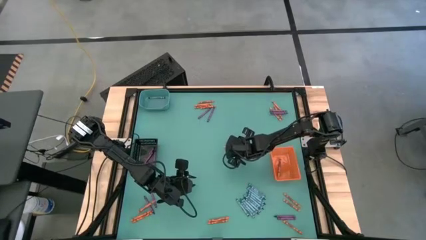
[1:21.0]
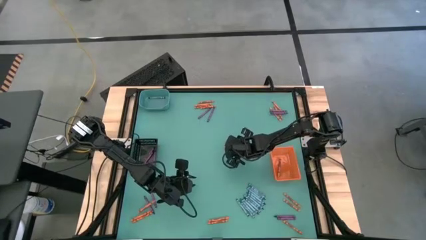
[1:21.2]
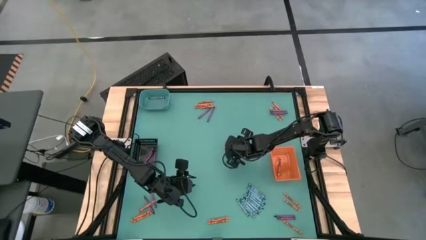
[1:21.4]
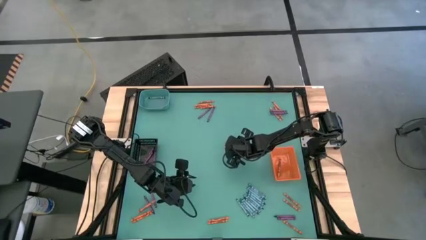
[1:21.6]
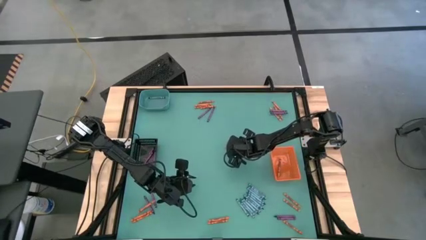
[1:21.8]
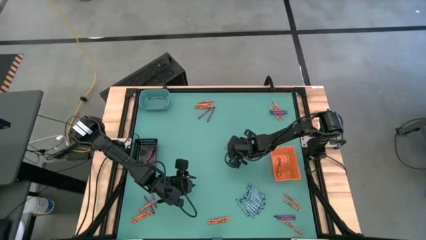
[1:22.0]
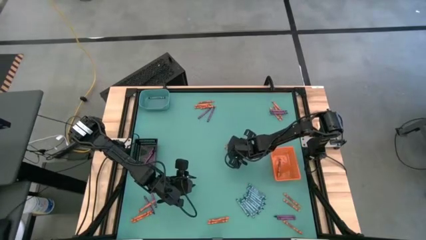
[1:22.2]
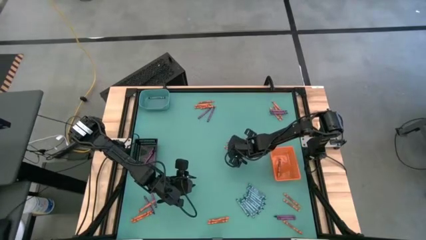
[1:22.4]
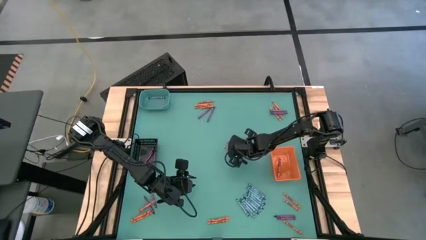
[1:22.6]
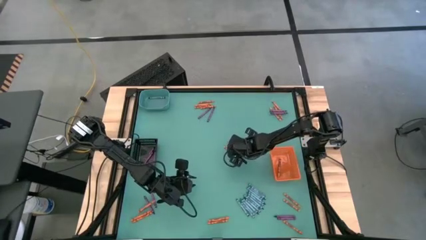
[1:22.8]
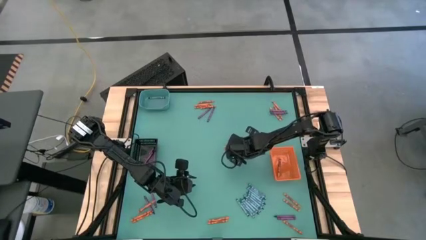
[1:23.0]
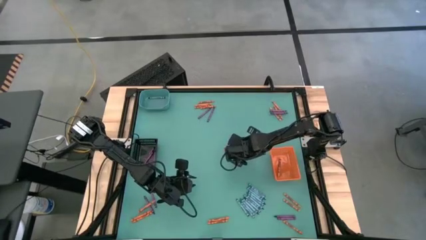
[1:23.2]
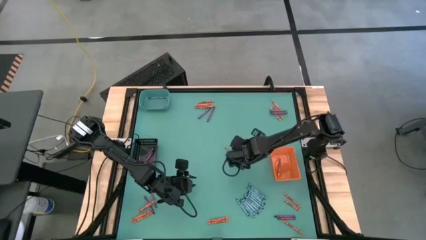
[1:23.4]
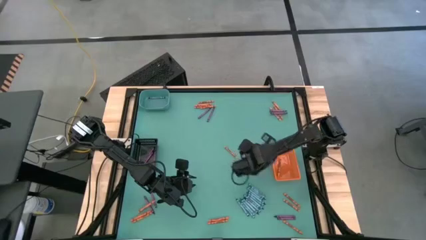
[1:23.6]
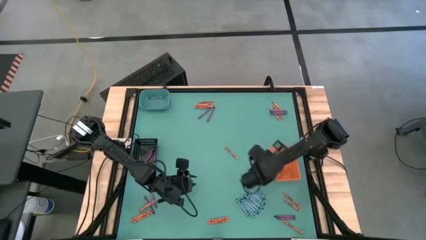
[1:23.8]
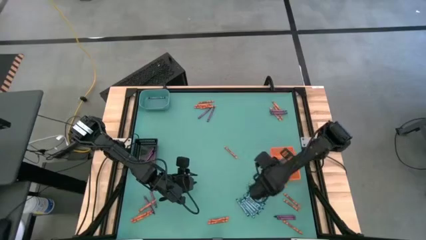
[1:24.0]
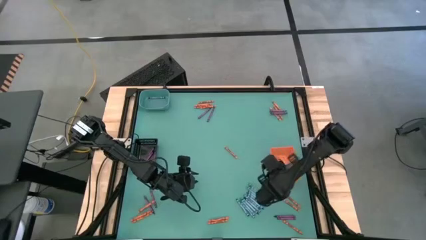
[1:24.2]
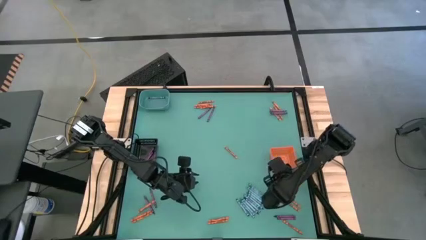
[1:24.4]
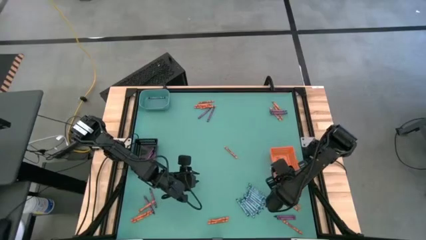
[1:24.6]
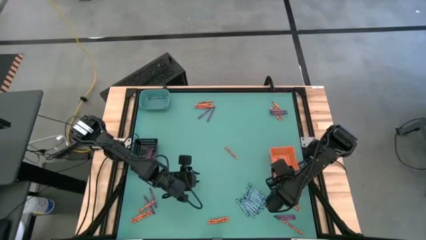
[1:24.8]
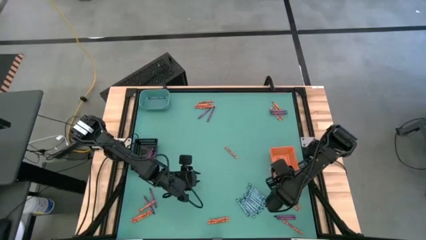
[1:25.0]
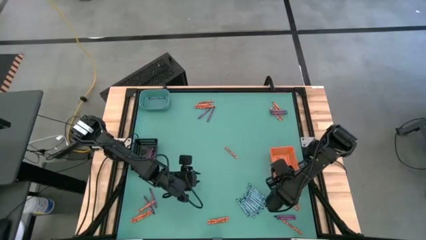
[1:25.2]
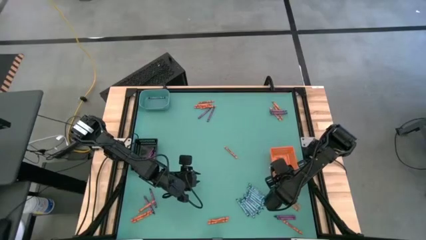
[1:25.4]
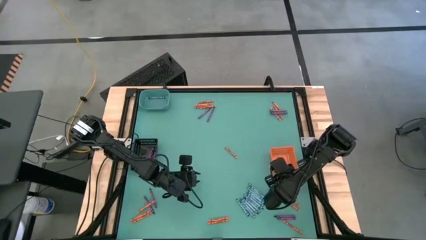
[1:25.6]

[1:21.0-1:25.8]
Task: Sort crayons
Put the orange crayon into the orange bin

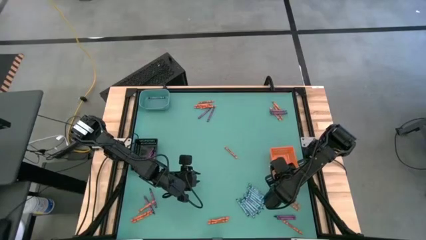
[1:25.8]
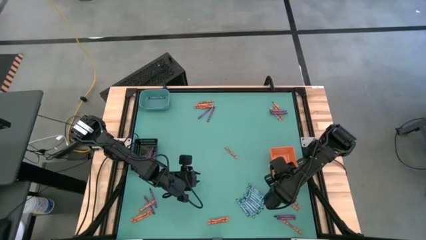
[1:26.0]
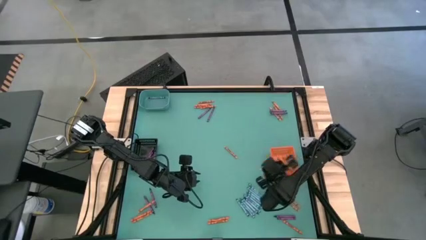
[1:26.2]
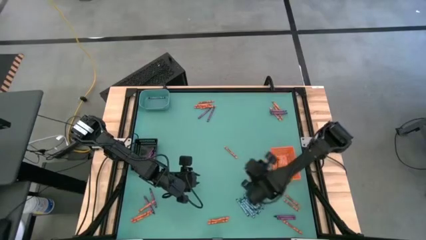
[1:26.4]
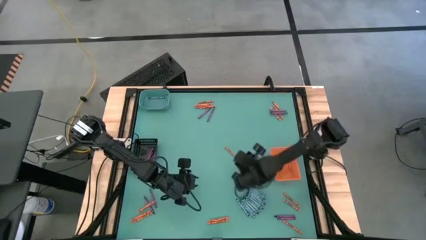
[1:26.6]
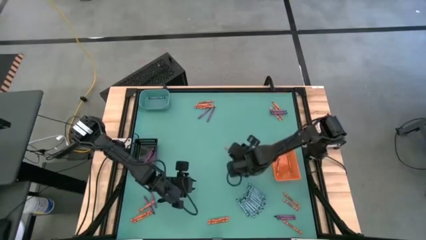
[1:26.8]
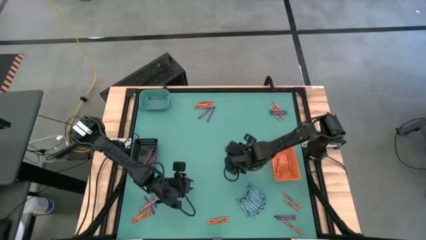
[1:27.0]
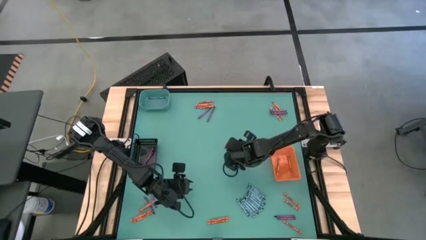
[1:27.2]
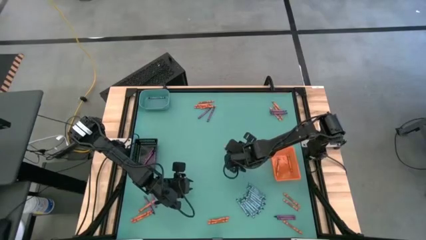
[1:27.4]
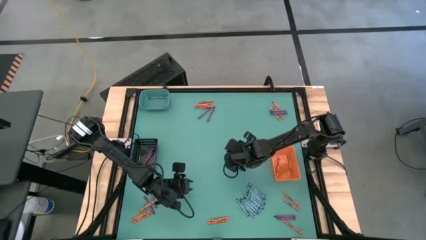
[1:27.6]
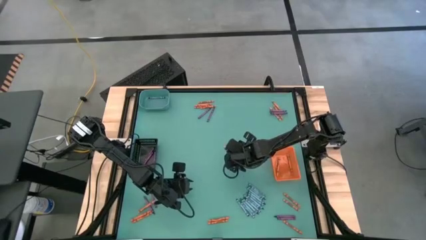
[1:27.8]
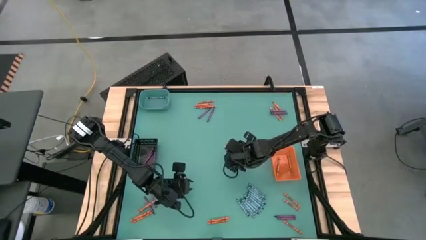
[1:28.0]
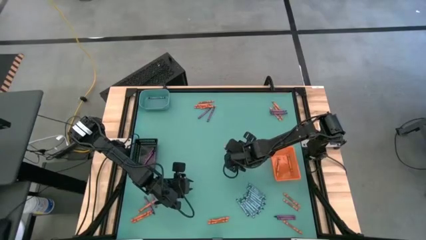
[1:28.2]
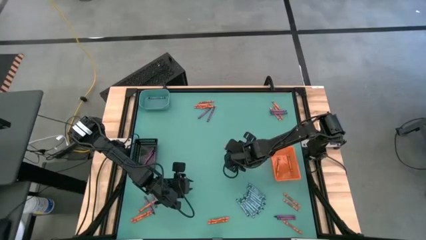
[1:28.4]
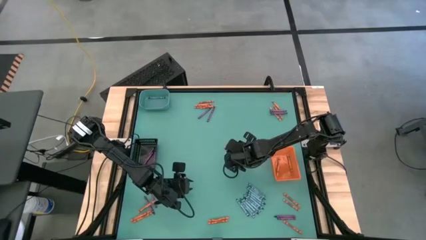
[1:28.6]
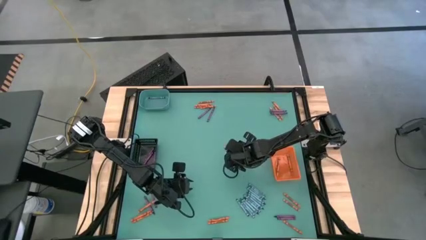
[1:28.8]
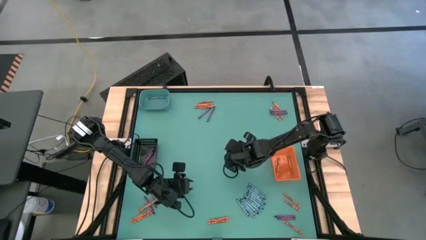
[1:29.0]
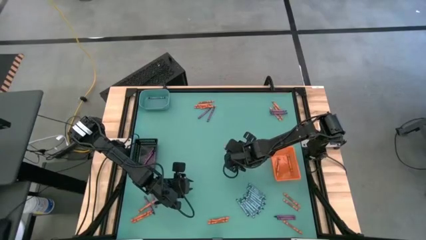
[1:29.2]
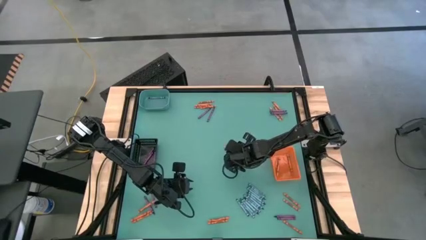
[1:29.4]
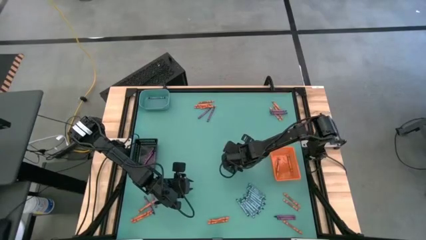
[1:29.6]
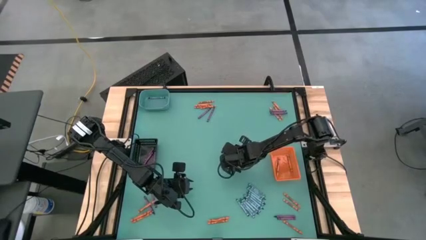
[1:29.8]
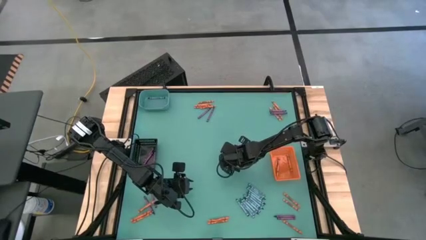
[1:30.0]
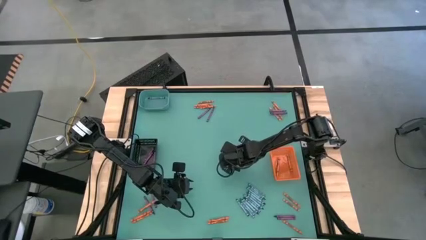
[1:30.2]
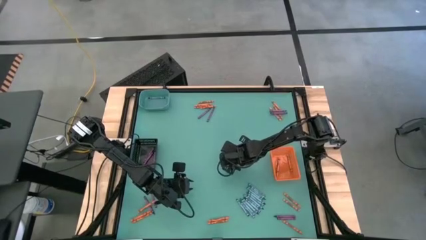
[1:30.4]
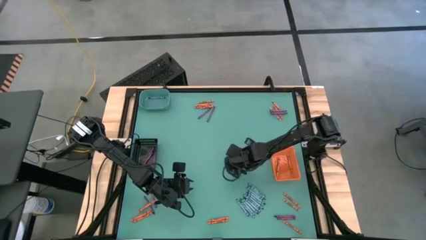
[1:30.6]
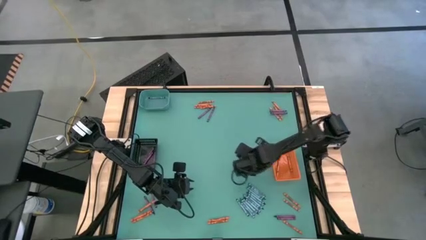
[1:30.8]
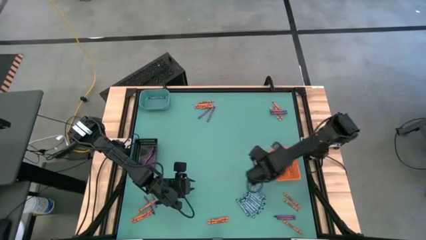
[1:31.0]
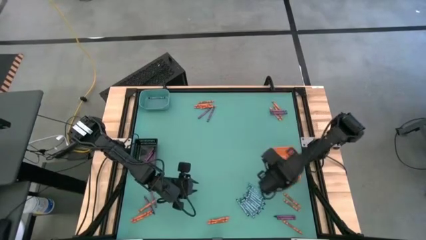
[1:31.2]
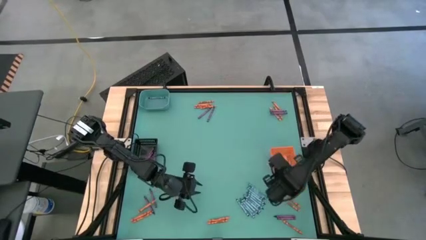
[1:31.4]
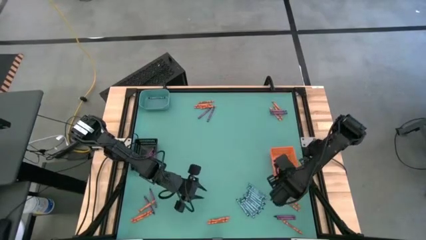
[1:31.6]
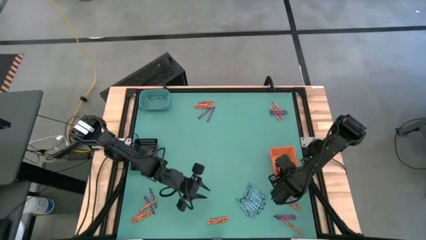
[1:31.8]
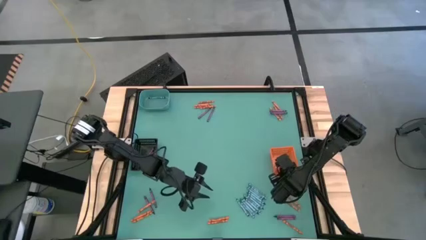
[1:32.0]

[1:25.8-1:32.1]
Put the orange crayon into the orange bin

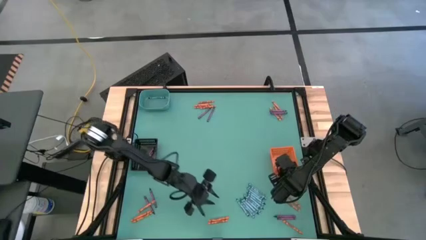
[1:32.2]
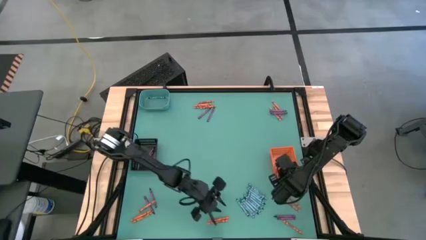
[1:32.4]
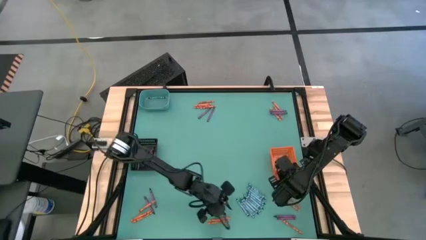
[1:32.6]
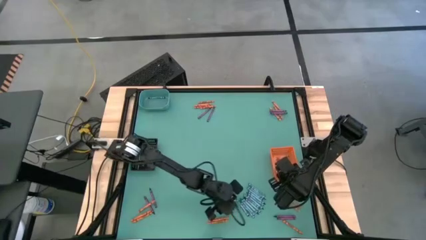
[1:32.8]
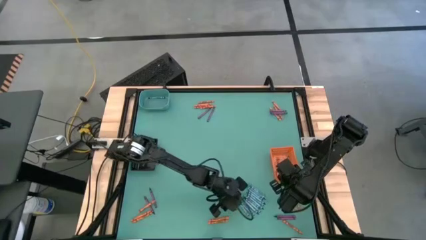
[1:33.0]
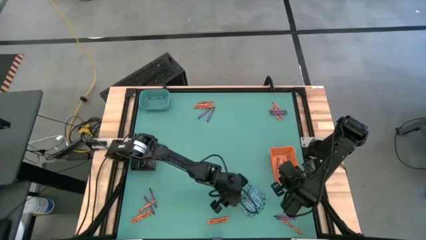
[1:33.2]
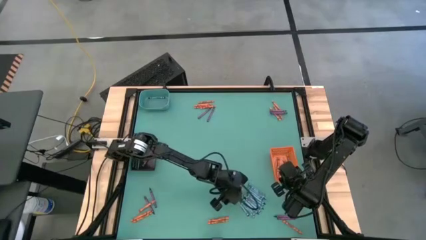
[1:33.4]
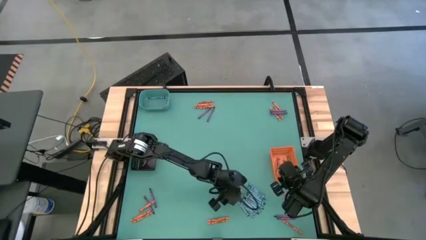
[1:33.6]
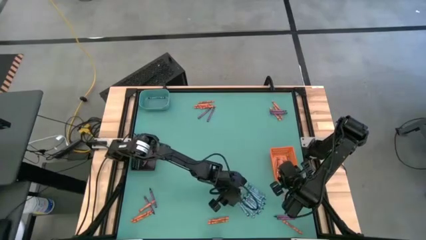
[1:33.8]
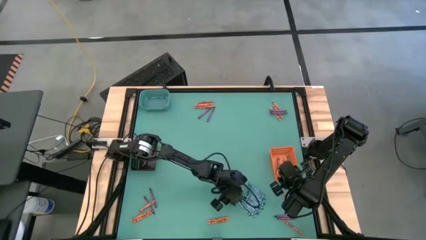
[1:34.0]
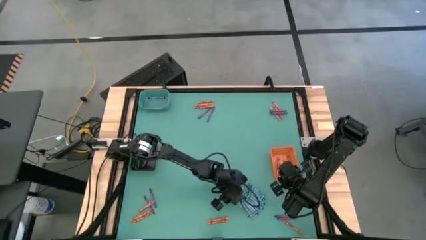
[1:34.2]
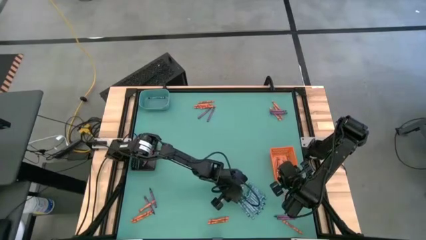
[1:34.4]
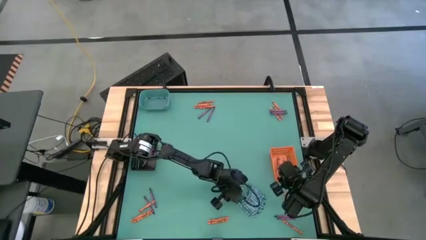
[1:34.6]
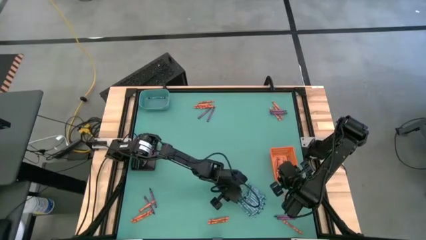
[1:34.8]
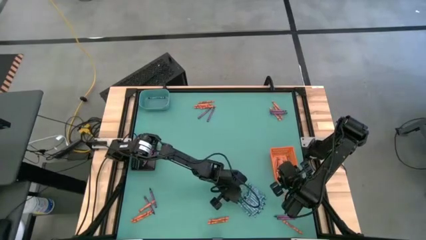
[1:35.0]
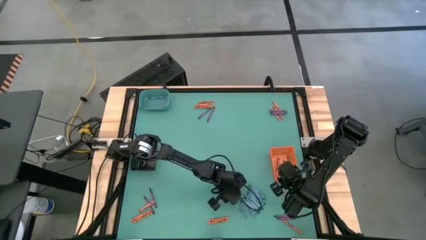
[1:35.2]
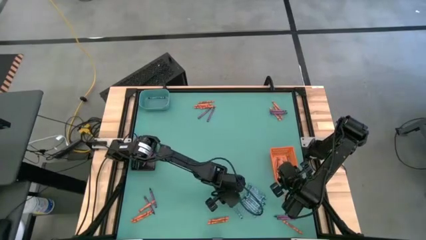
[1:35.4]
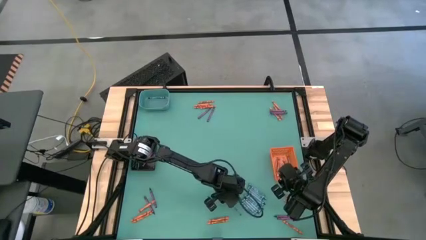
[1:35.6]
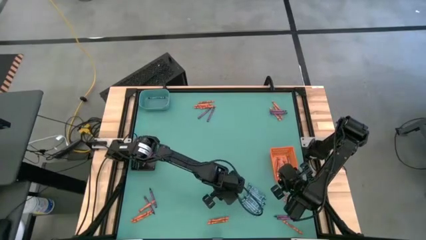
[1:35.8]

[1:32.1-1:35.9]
Put the blue crayon into the green bin
